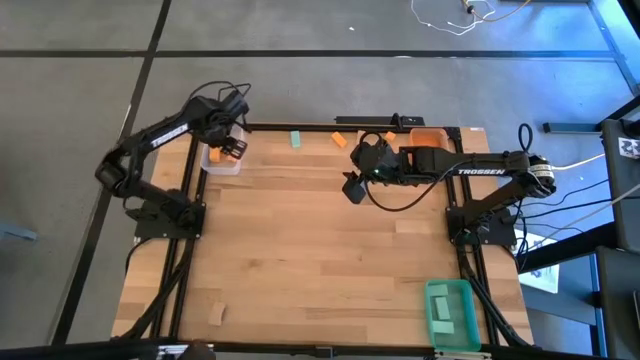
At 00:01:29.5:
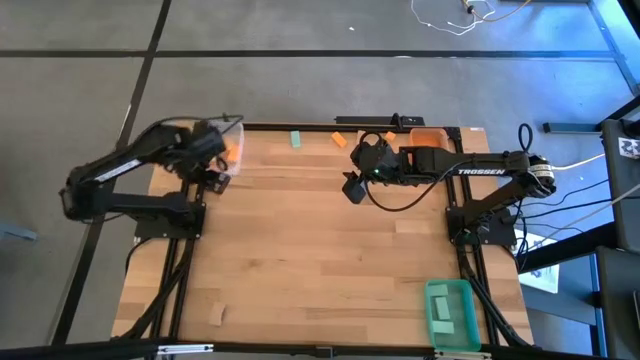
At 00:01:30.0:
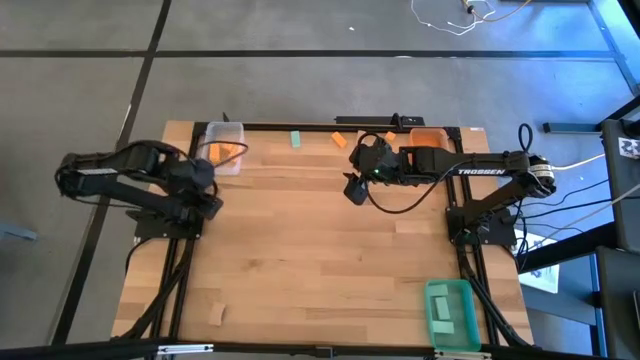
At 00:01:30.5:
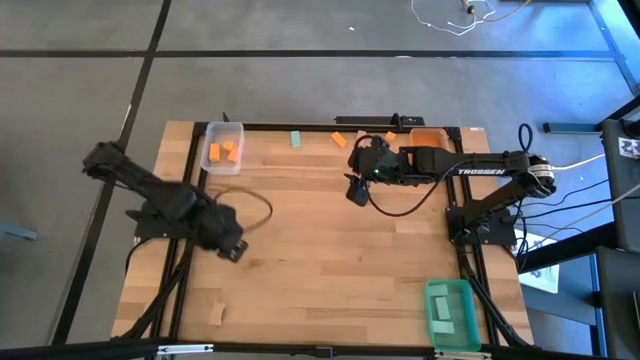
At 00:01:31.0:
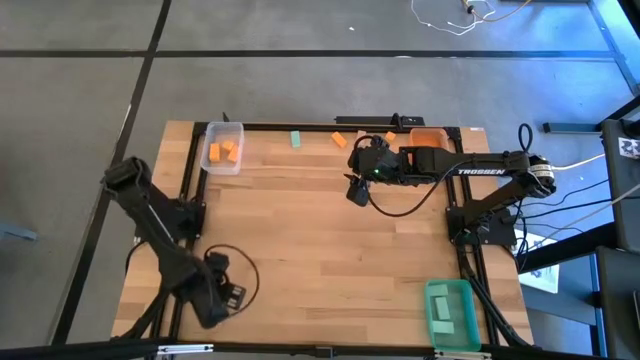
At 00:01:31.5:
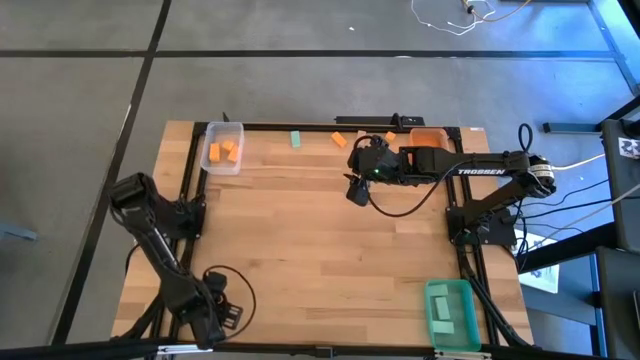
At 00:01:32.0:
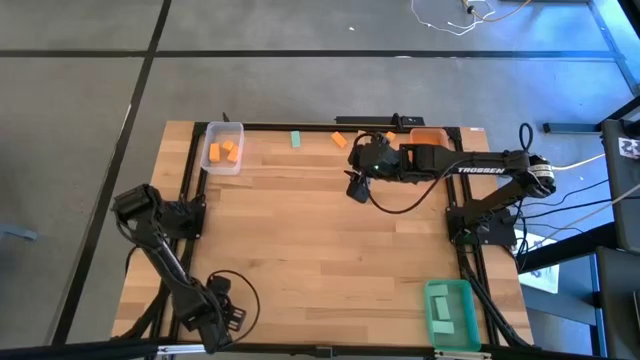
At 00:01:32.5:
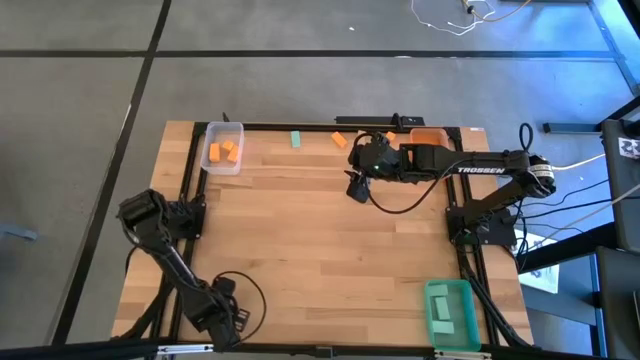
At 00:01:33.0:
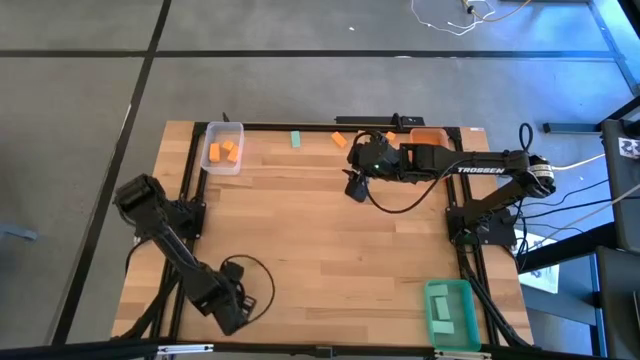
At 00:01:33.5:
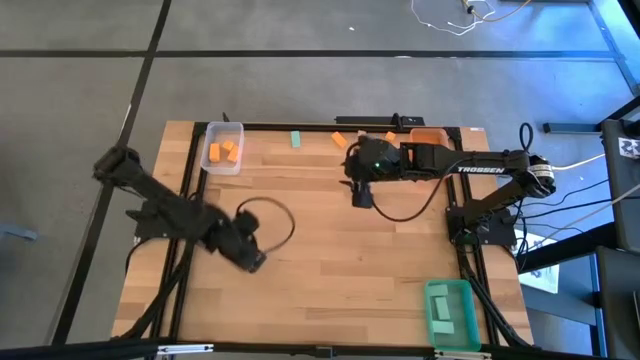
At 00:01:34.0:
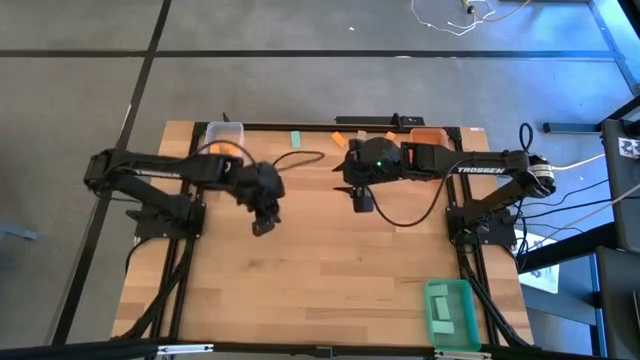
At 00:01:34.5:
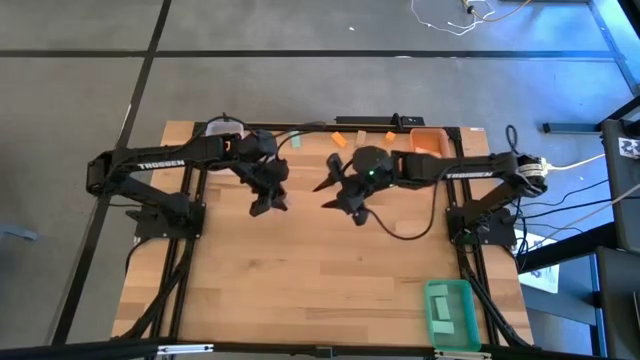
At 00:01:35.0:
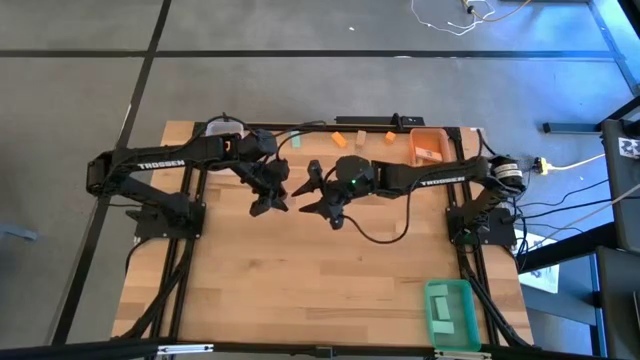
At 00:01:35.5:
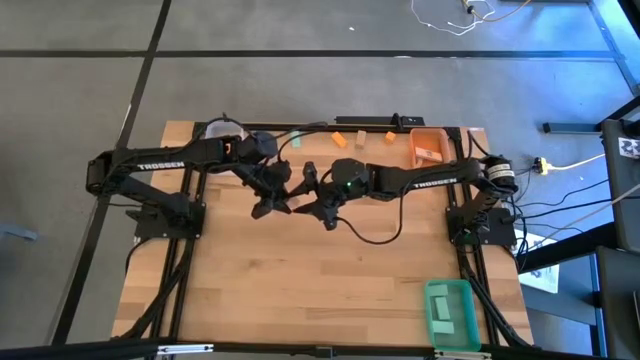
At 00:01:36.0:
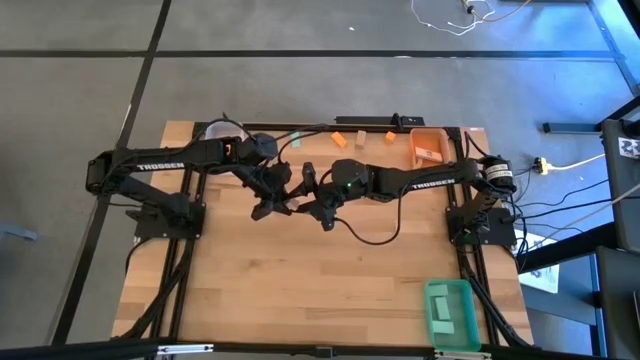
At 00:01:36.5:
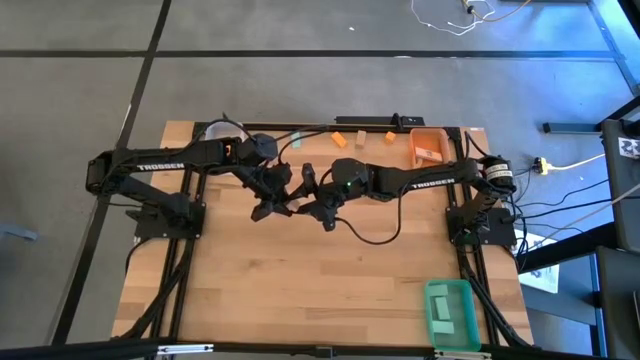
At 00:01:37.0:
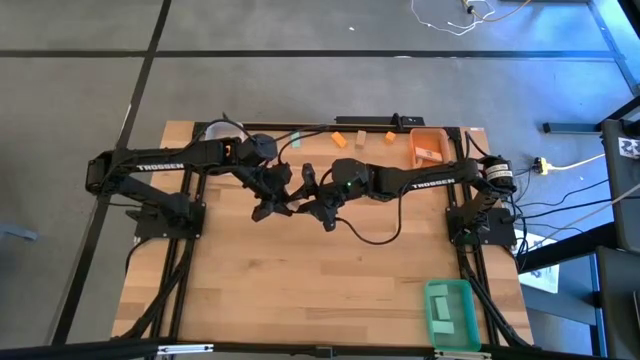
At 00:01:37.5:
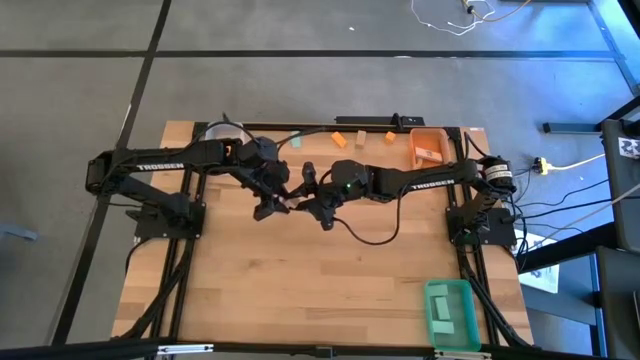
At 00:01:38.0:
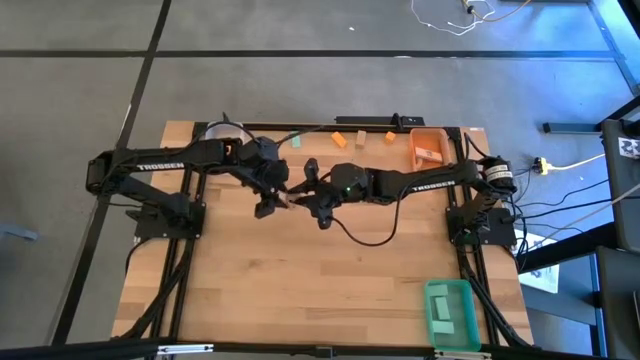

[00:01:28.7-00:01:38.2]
Task: Sort & place blocks by color
Put the brown block into the orange bin

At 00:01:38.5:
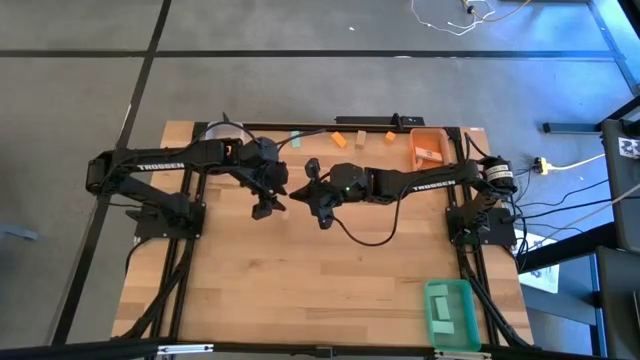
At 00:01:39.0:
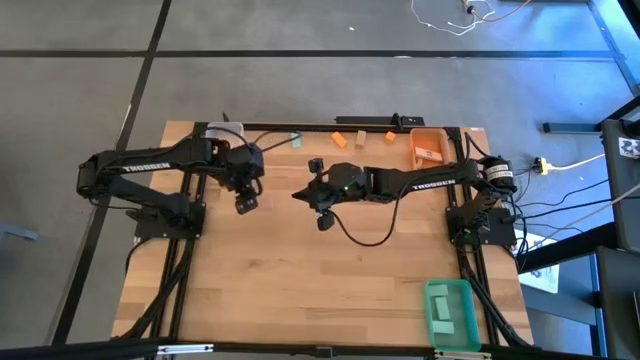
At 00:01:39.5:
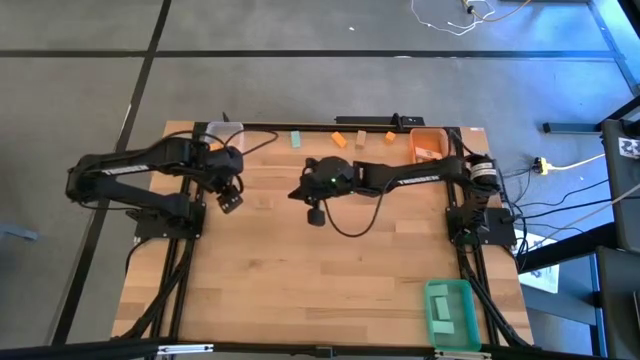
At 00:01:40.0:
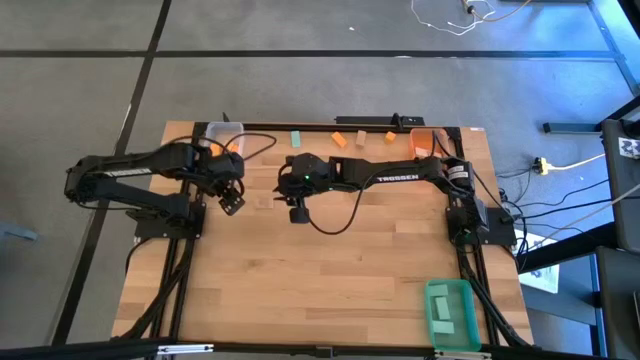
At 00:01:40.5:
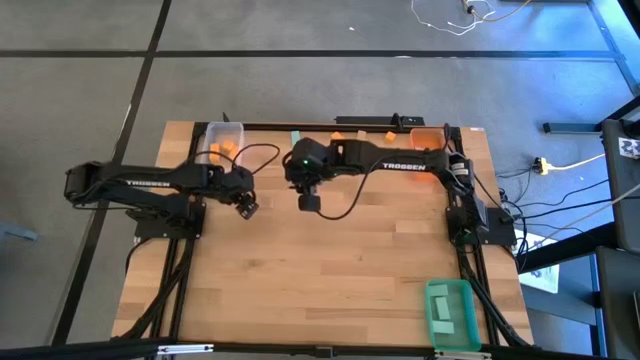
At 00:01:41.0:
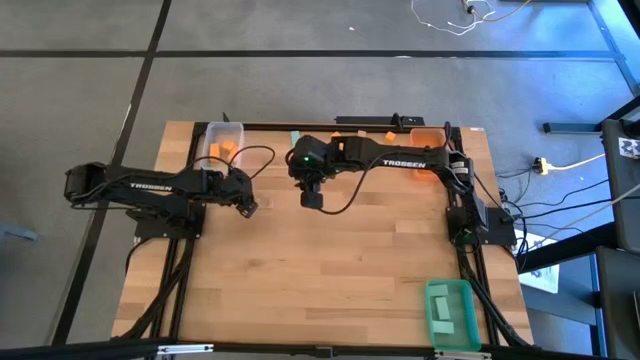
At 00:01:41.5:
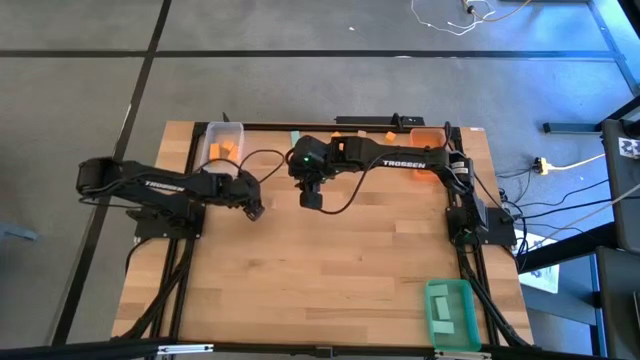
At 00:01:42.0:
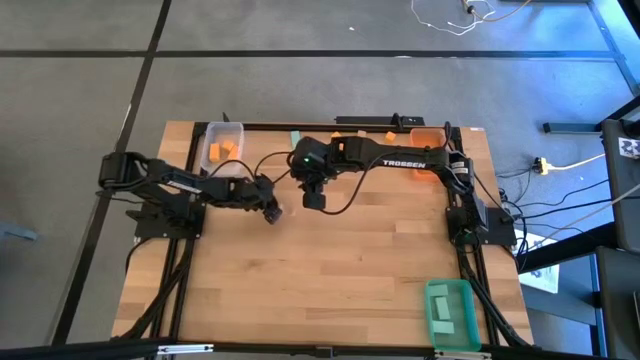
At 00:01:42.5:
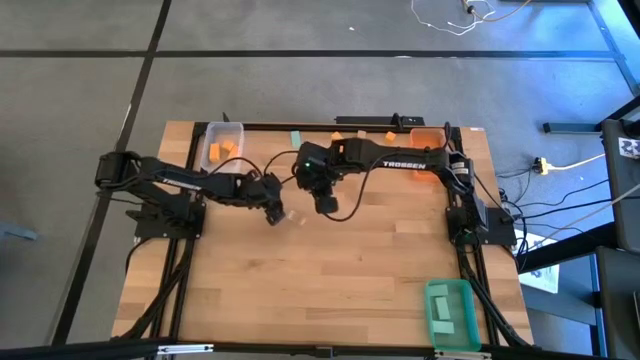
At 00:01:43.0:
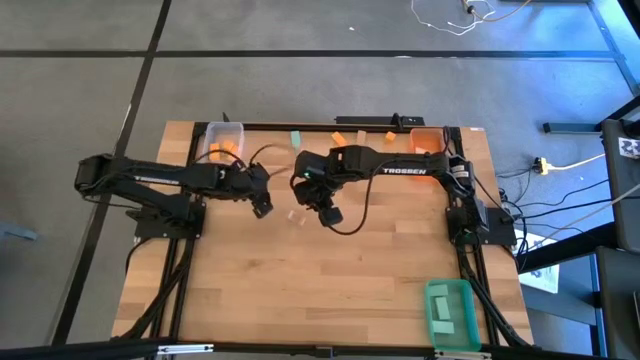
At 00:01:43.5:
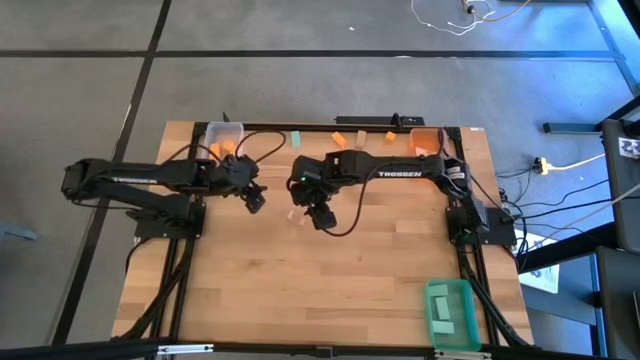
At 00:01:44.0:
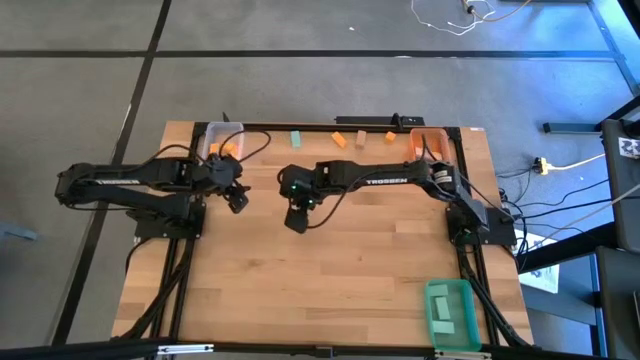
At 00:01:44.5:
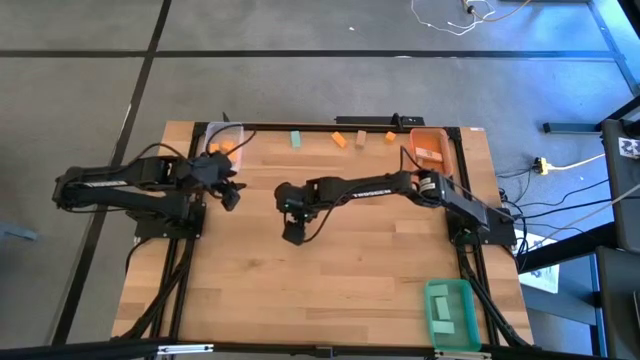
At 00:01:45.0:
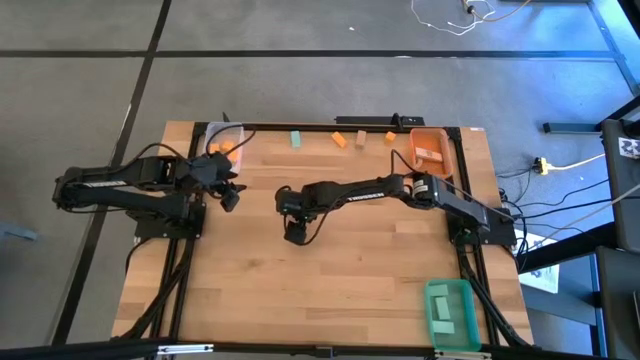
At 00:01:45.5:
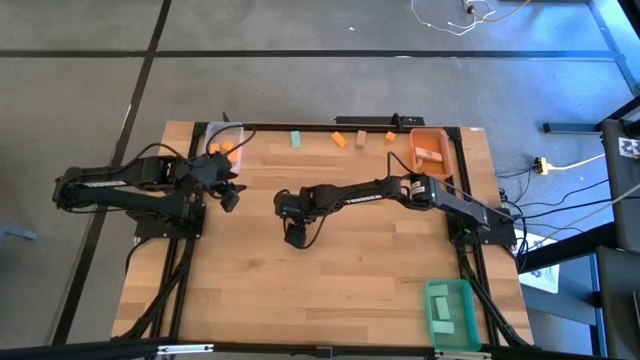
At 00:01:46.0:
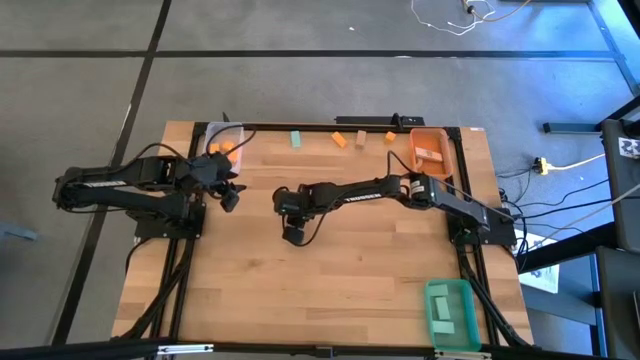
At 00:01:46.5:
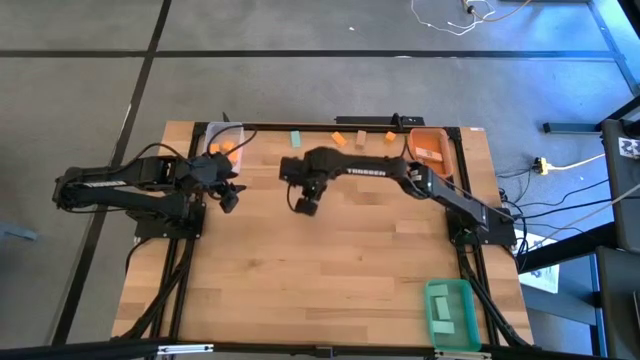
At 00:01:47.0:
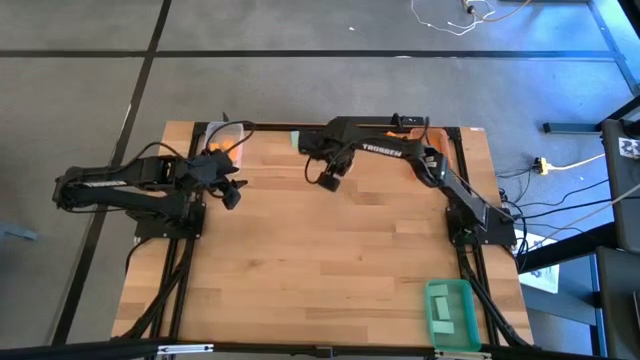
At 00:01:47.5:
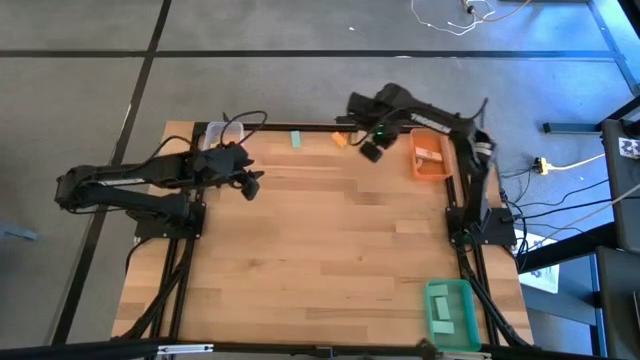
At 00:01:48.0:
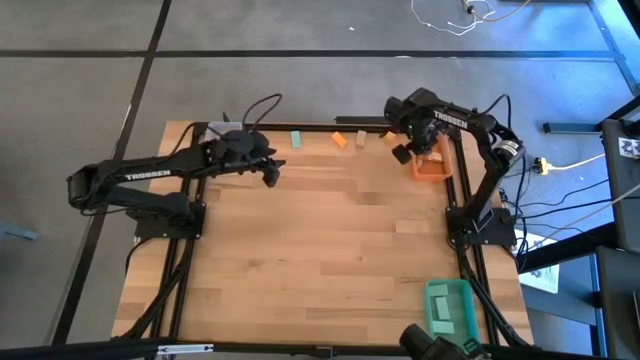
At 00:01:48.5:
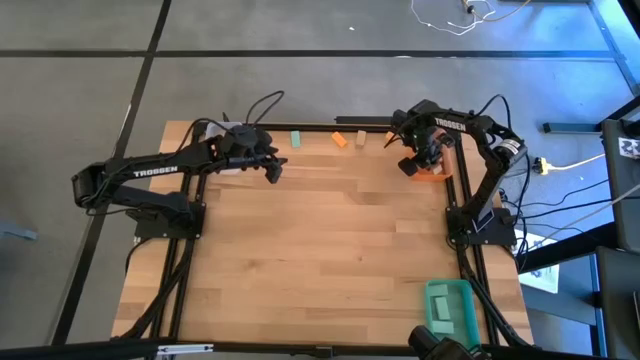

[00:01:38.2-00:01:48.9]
Put the brown block into the orange bin

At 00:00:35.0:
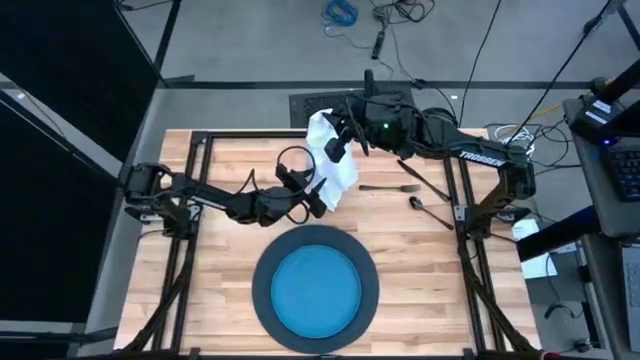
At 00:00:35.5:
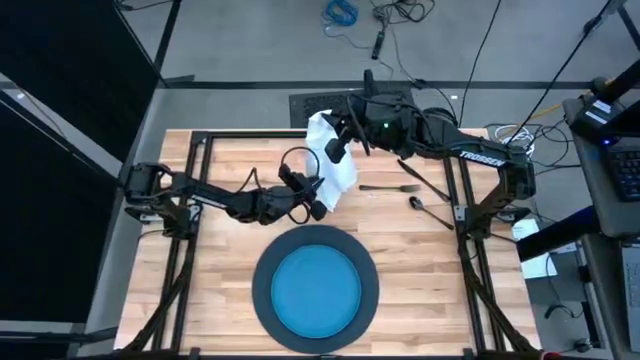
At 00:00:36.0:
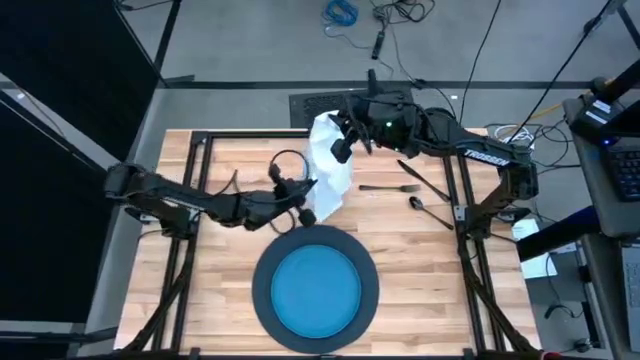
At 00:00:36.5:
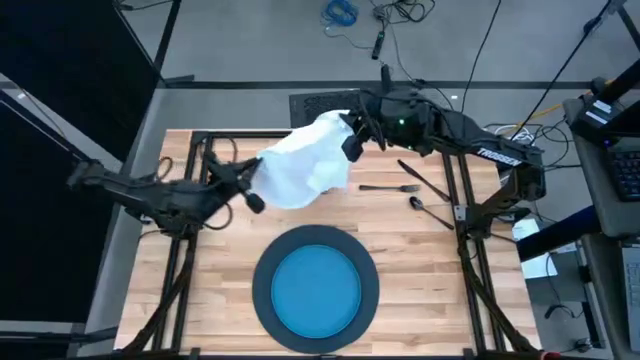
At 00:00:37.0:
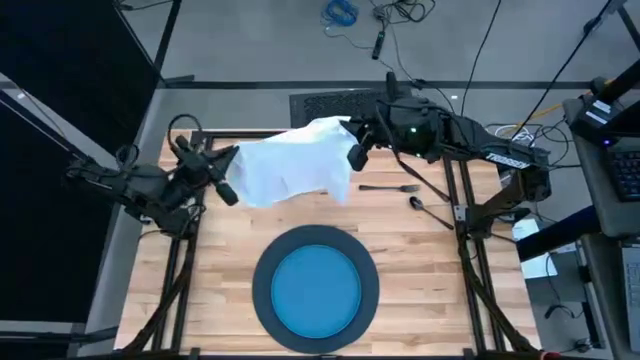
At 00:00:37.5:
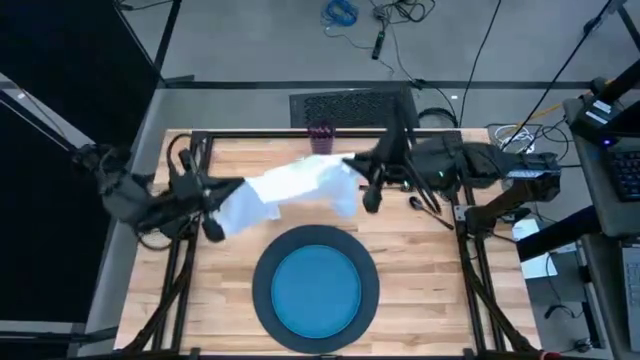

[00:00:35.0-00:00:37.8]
Task: Set table place
Fold the white table napkin on the table
